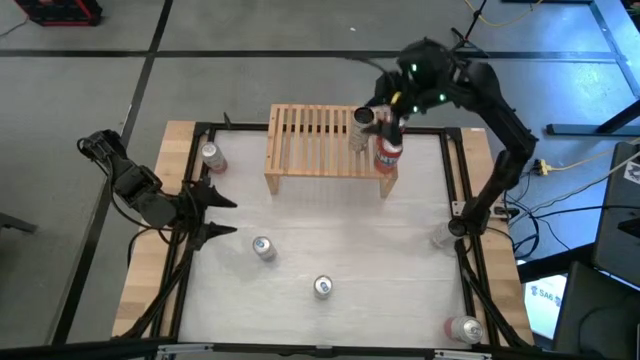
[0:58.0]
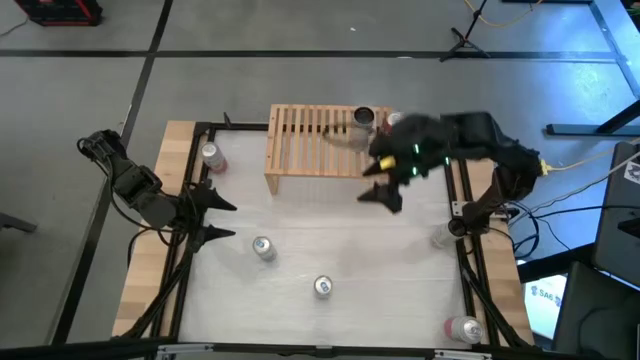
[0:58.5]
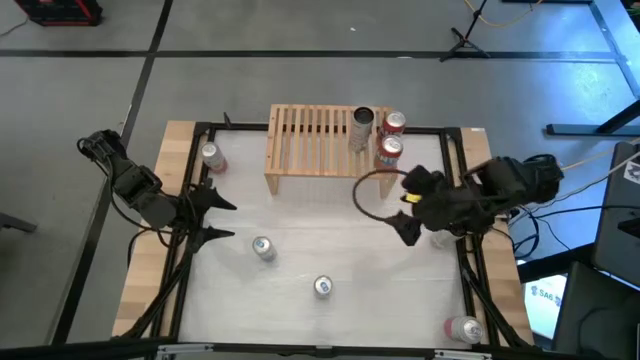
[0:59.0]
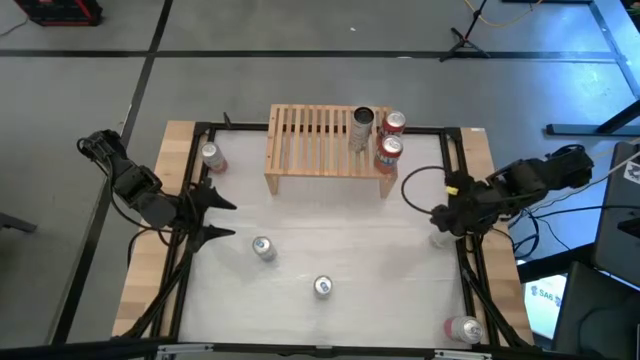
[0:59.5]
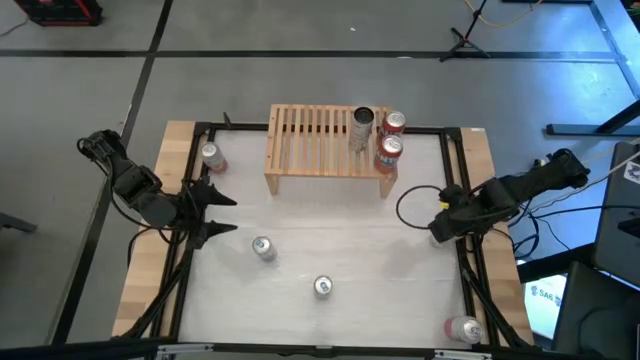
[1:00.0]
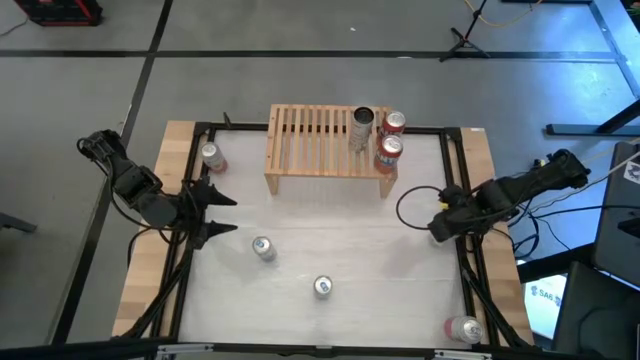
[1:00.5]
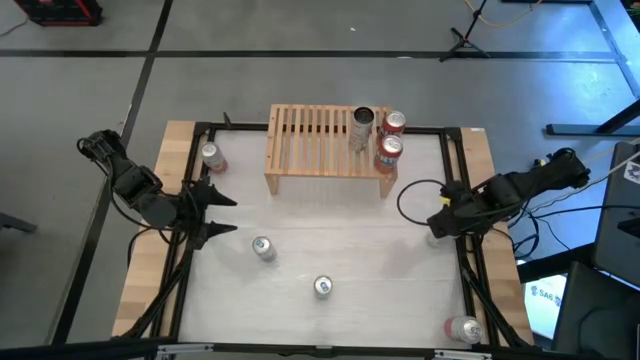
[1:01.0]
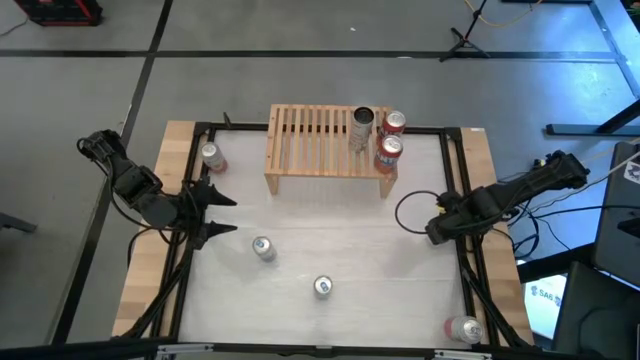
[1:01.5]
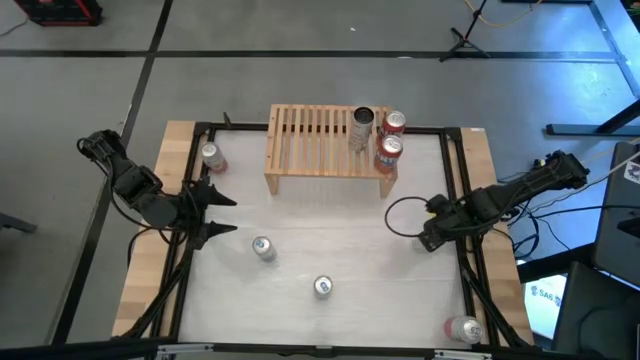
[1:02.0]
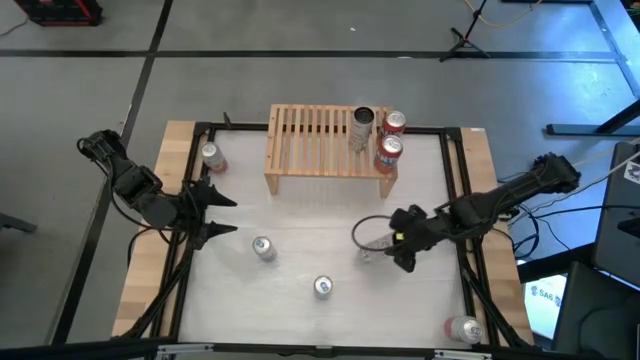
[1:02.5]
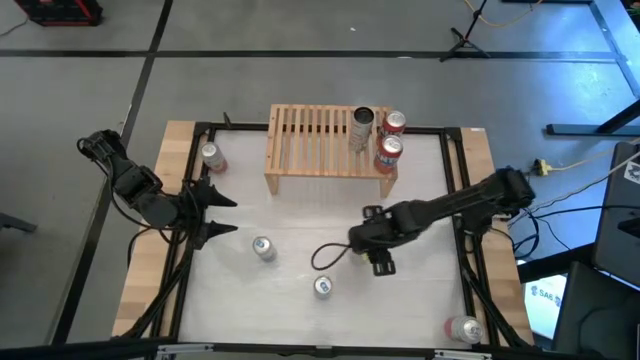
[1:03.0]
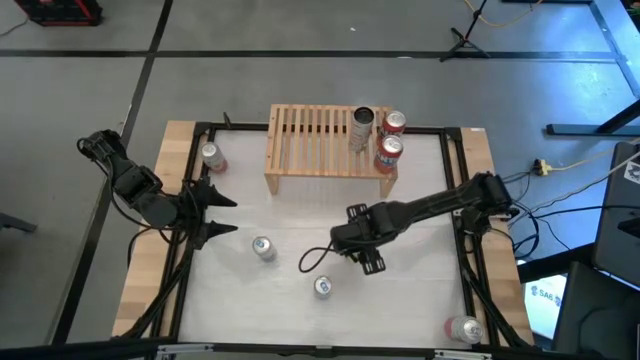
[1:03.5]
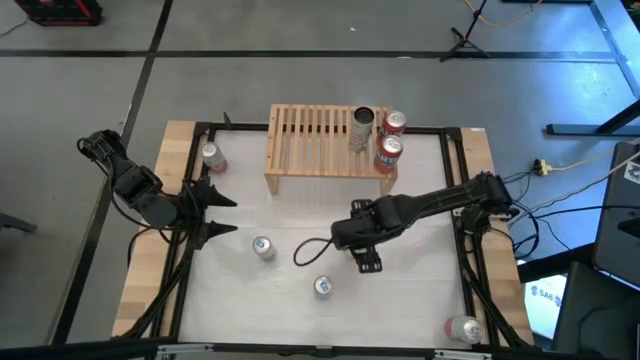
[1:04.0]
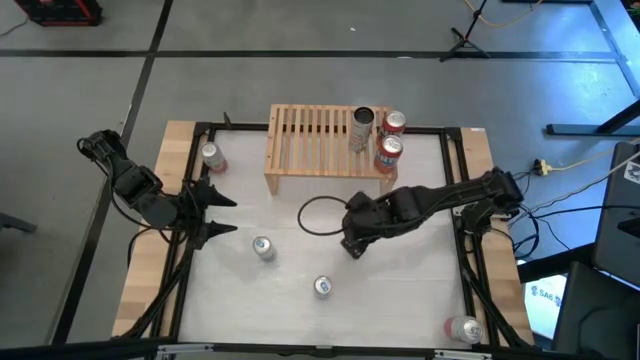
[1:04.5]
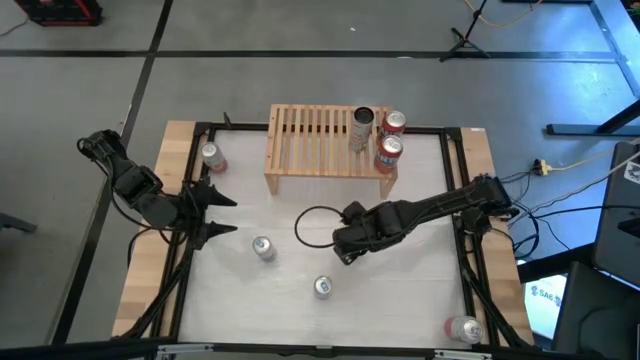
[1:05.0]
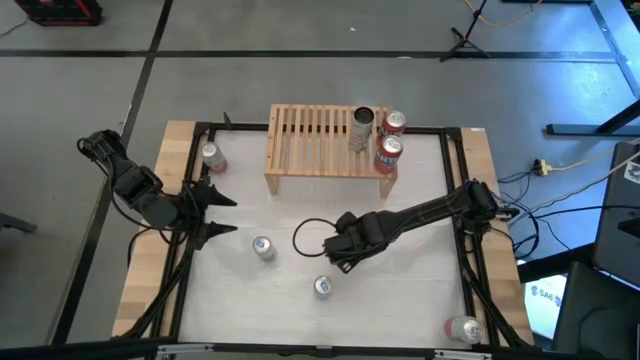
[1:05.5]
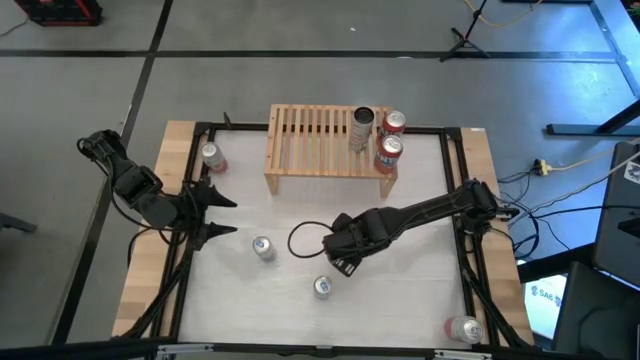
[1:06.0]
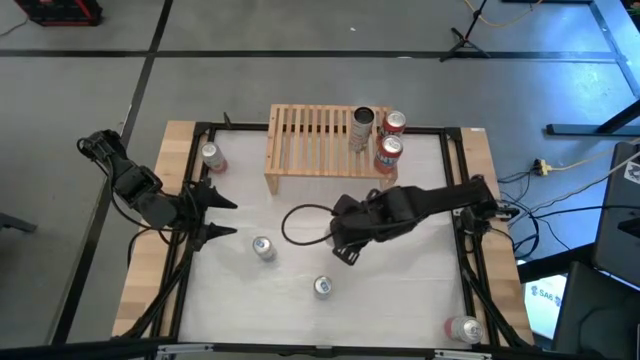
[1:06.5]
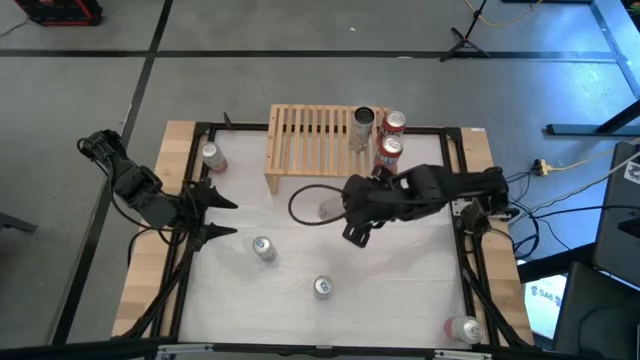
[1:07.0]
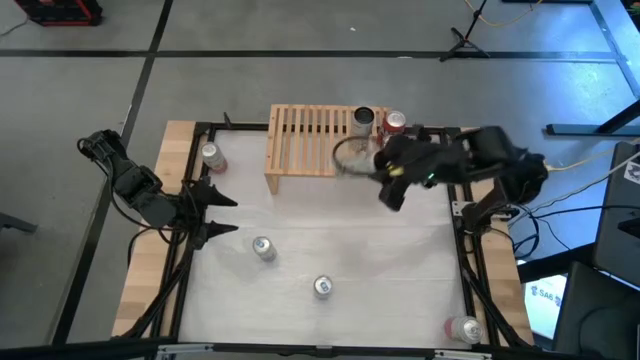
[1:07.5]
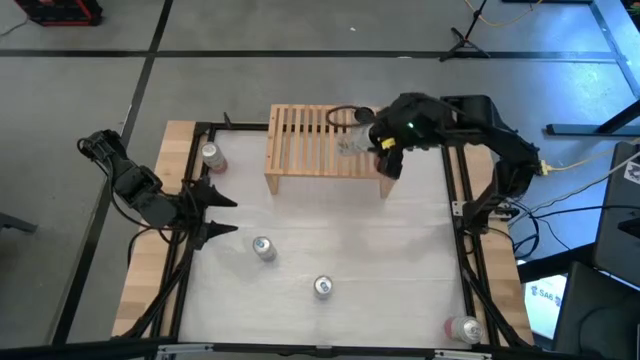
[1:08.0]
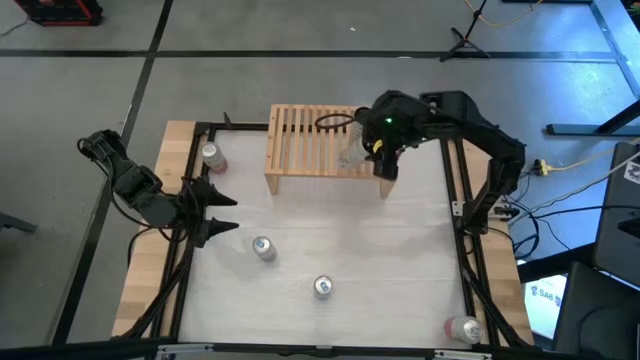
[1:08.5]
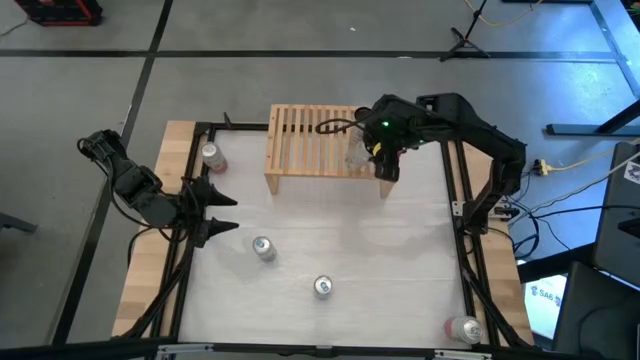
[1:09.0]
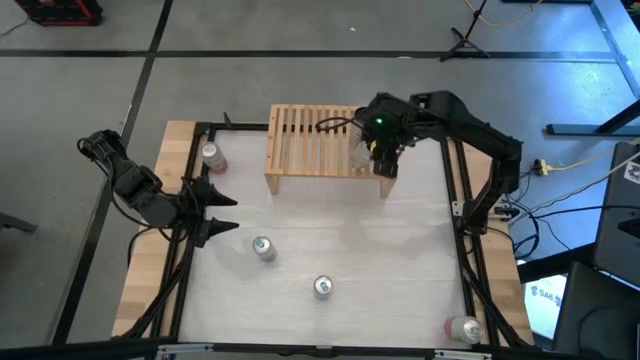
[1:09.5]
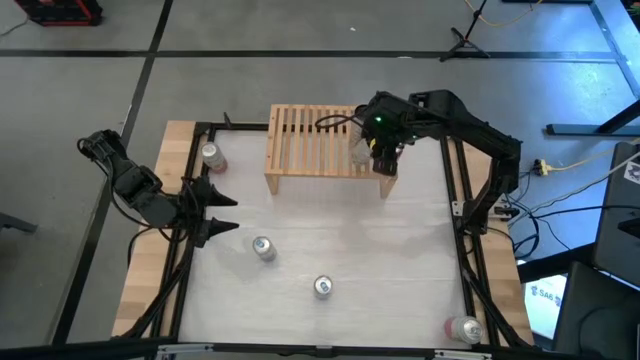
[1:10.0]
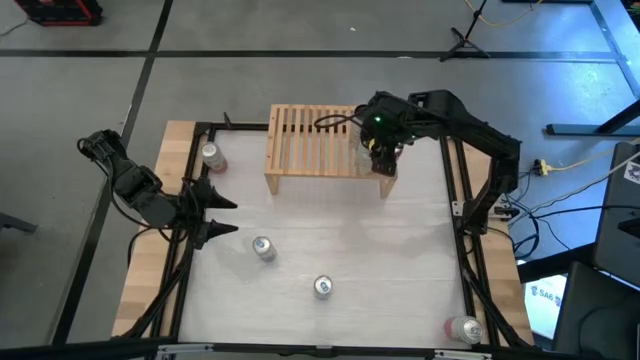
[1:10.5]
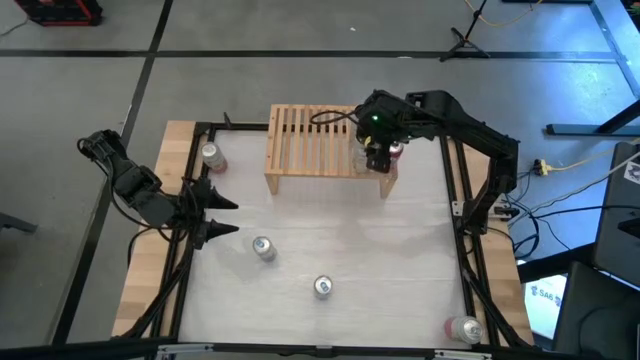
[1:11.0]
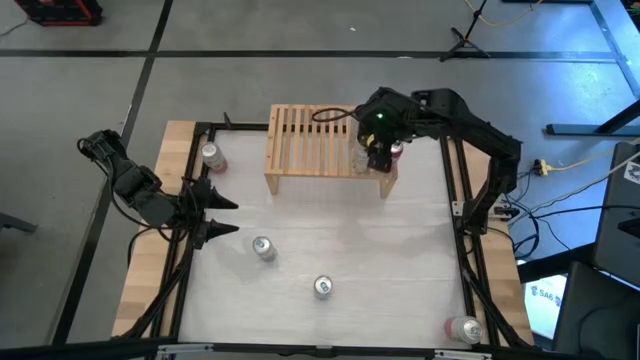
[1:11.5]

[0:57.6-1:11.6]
Task: Place canned beverage on shelf
Put the white yellow soda can aligned with the other white yellow soda can on the shelf

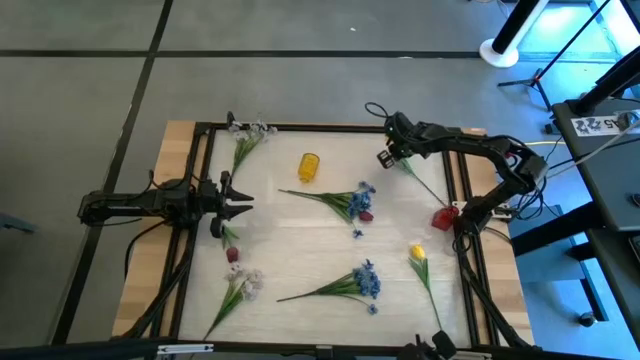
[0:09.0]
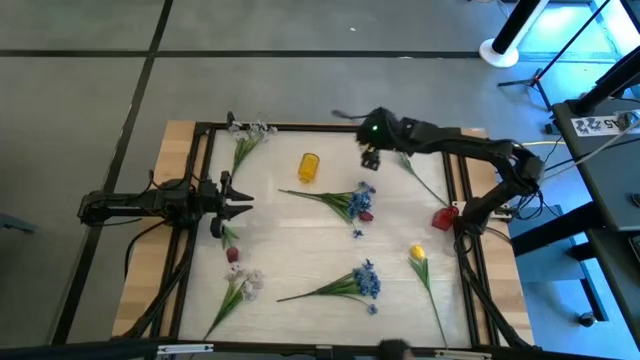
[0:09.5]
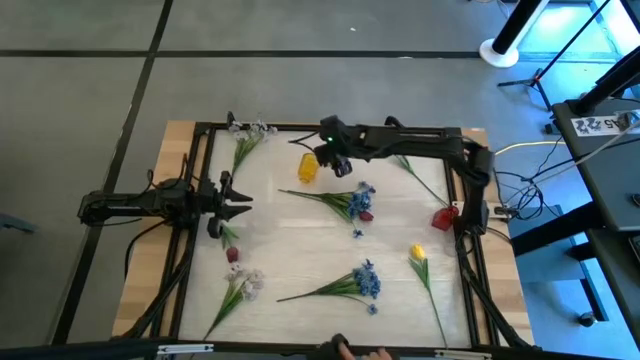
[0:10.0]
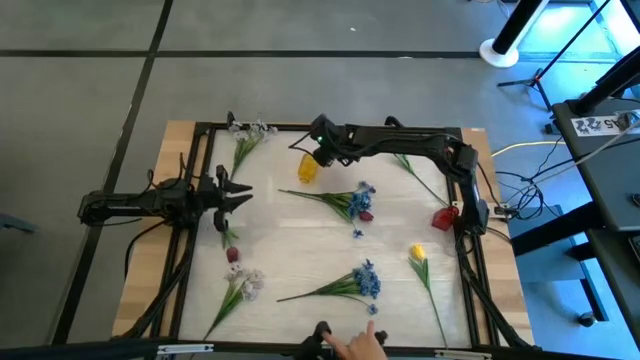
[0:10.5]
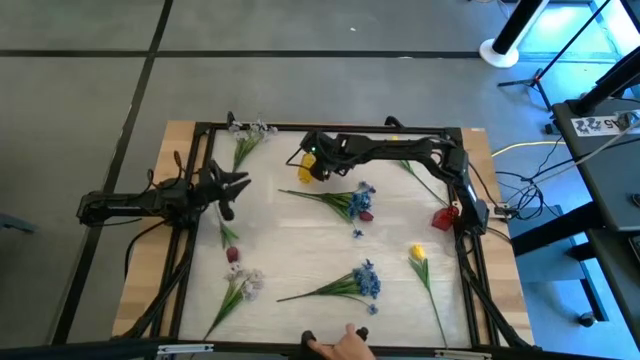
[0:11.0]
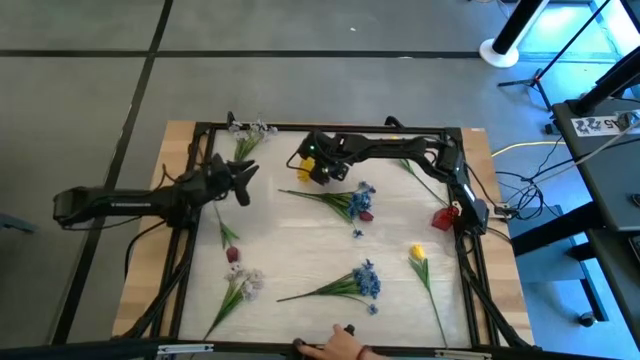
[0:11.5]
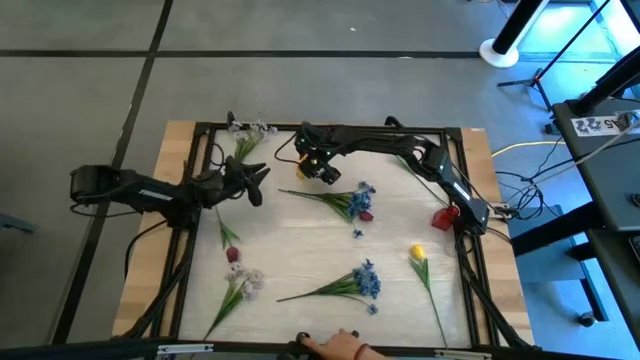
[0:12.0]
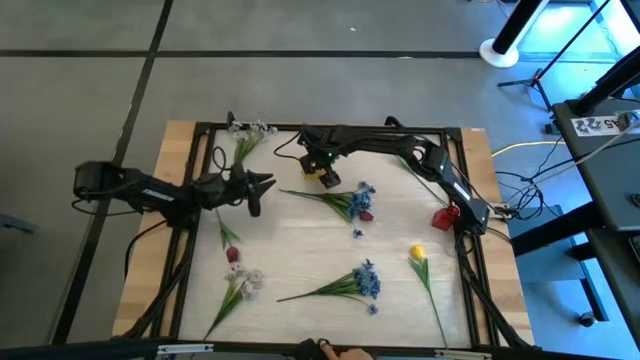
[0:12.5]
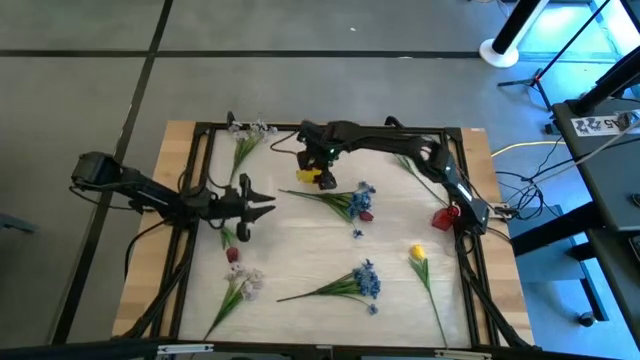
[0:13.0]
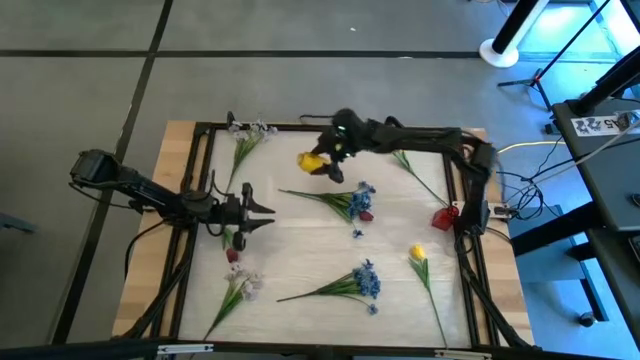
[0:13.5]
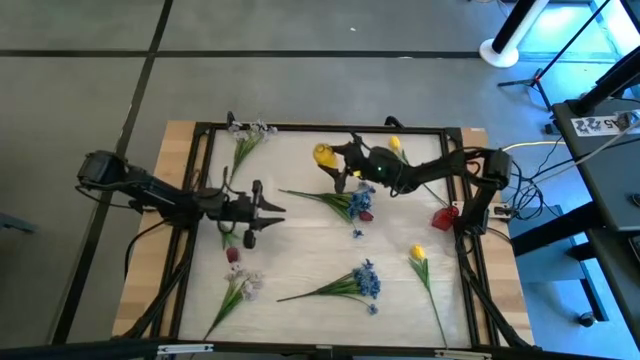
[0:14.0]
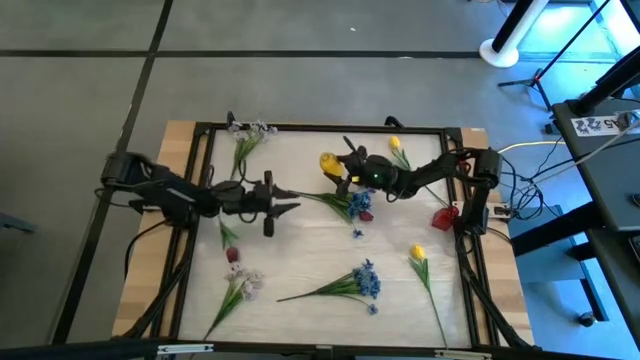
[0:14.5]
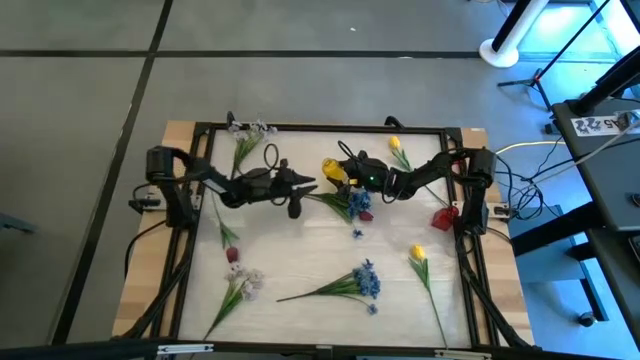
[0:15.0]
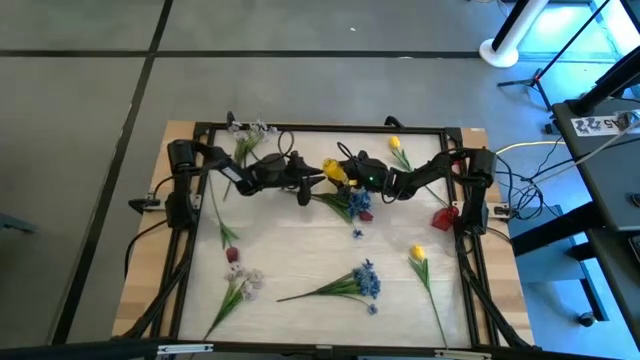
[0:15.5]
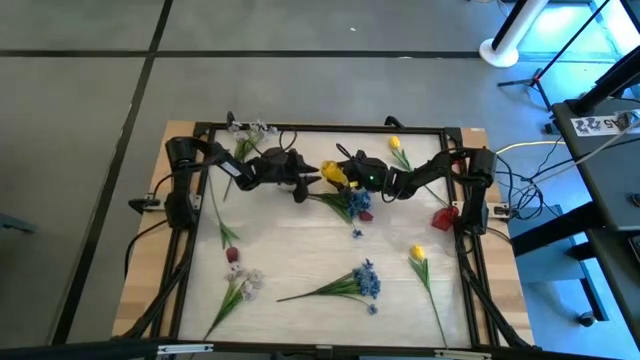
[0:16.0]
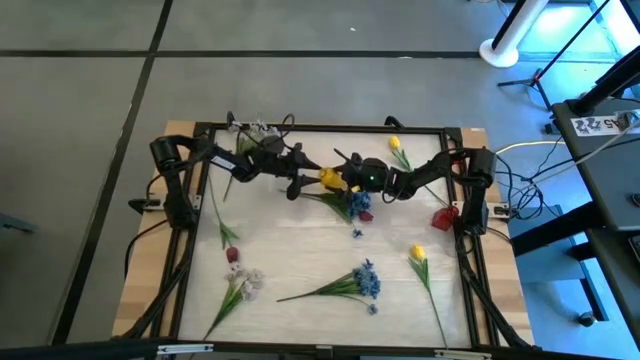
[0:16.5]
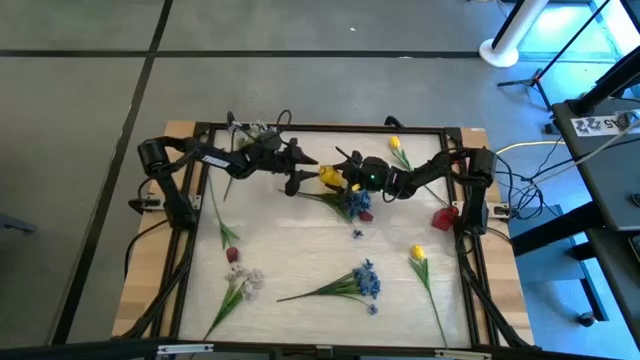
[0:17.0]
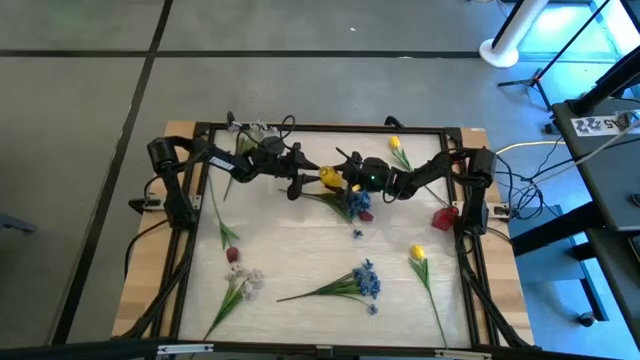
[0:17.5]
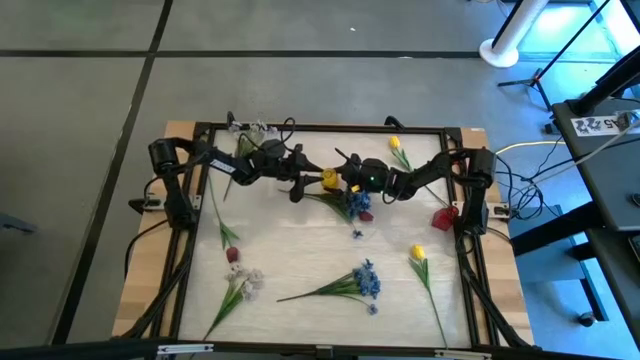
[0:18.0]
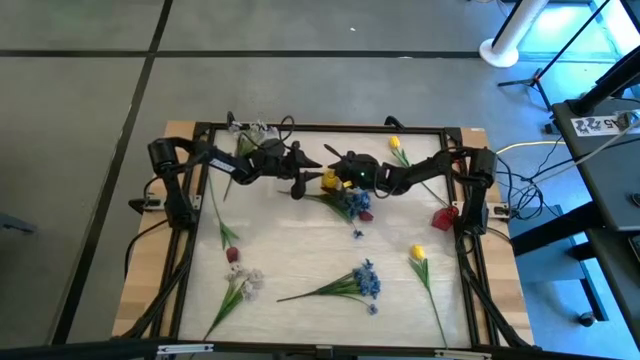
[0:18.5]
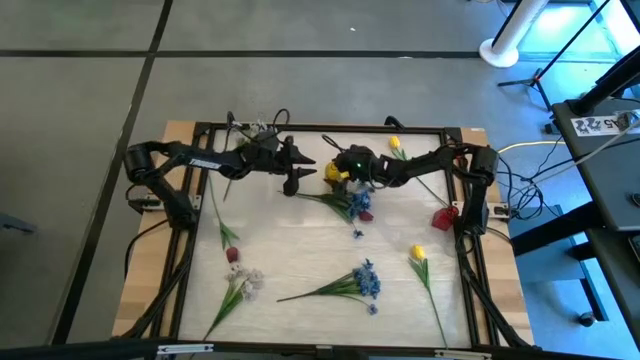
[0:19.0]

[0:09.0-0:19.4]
Task: Sort flowers into vase by color
Adjust the yellow vase
